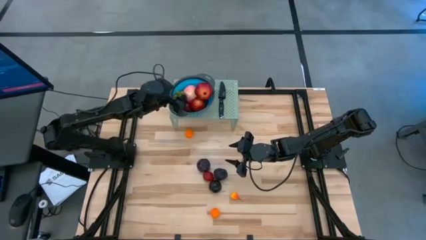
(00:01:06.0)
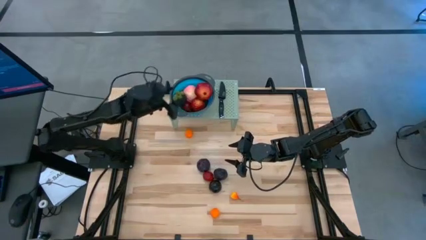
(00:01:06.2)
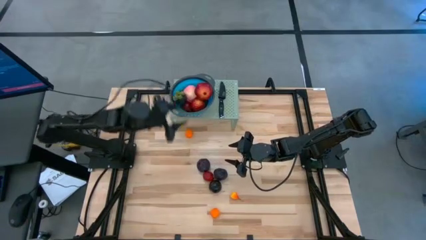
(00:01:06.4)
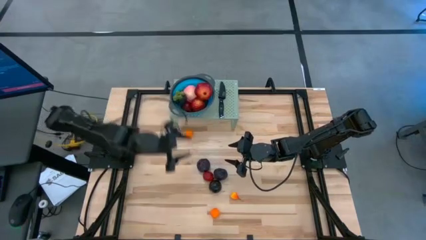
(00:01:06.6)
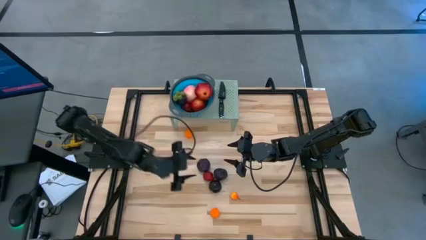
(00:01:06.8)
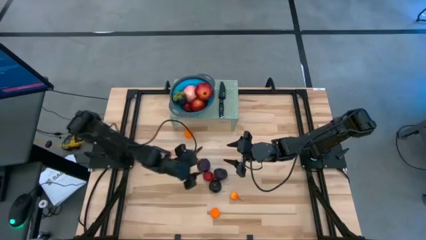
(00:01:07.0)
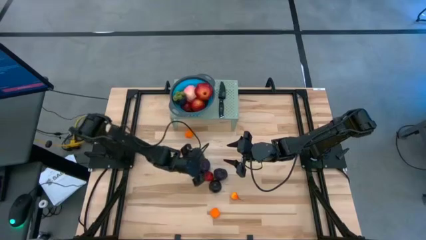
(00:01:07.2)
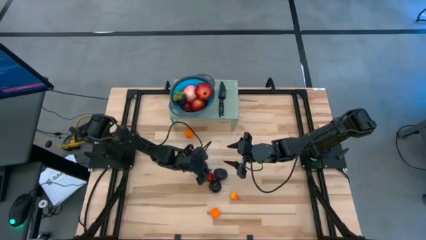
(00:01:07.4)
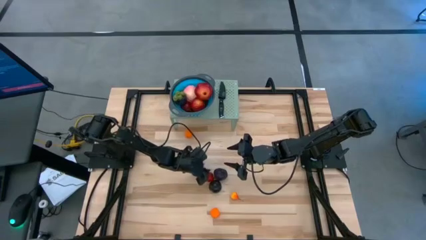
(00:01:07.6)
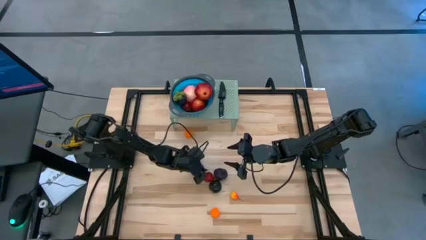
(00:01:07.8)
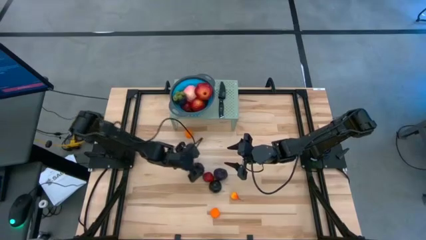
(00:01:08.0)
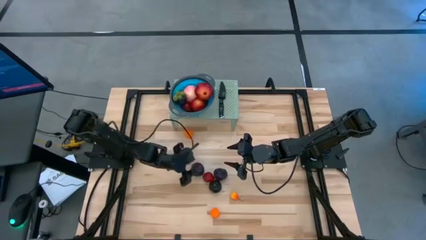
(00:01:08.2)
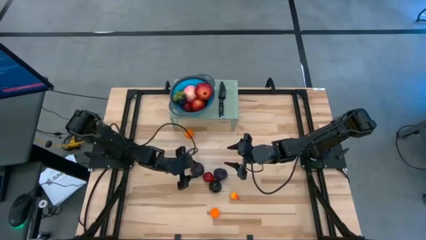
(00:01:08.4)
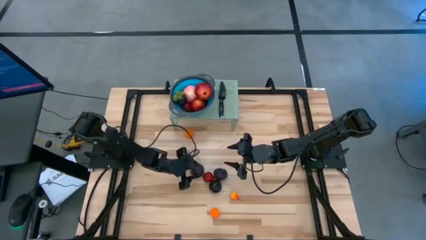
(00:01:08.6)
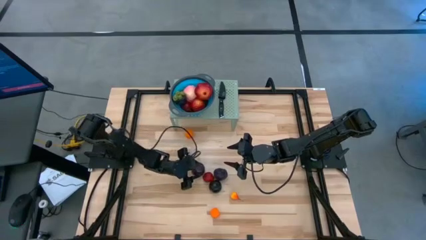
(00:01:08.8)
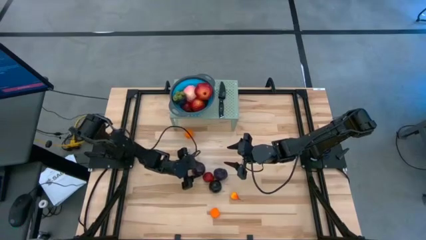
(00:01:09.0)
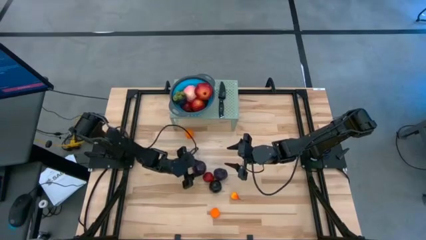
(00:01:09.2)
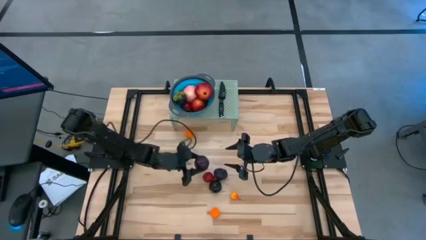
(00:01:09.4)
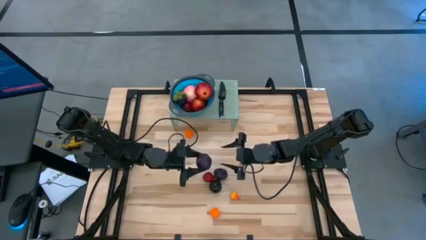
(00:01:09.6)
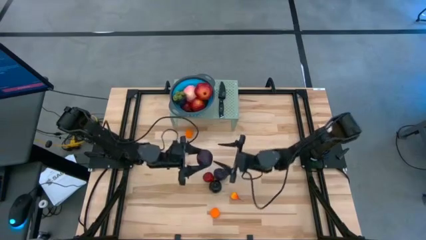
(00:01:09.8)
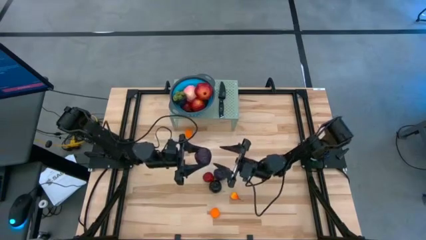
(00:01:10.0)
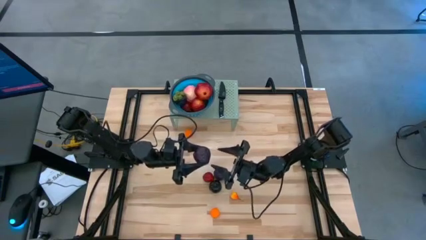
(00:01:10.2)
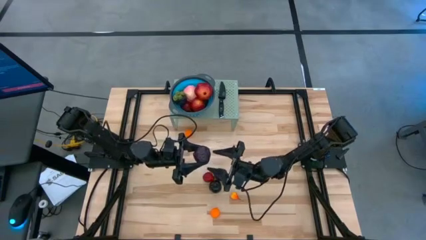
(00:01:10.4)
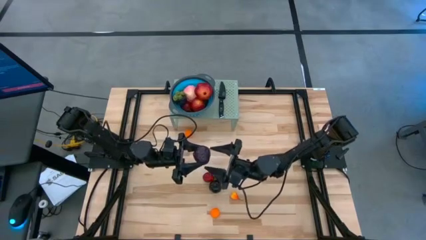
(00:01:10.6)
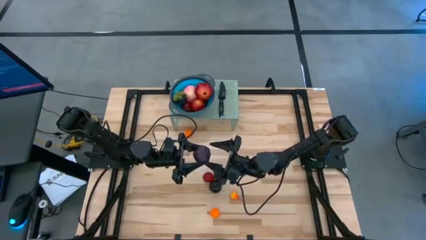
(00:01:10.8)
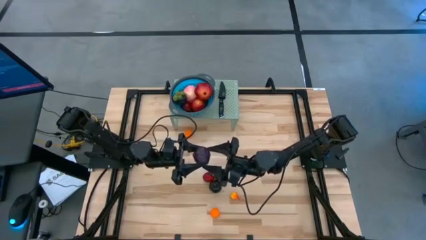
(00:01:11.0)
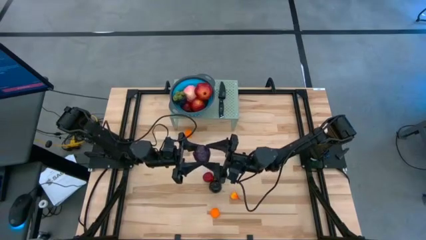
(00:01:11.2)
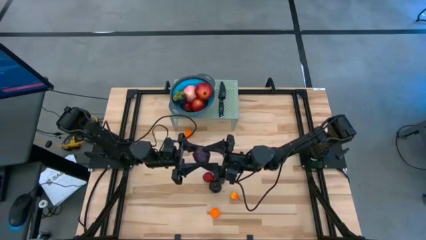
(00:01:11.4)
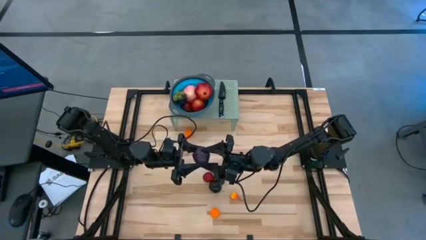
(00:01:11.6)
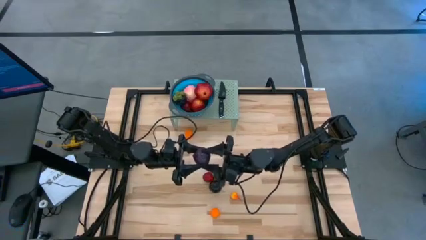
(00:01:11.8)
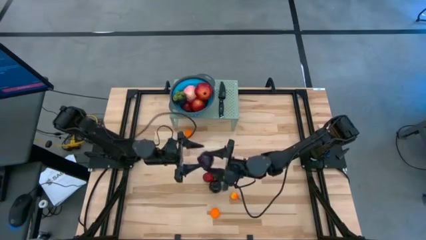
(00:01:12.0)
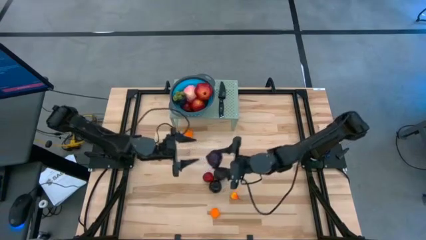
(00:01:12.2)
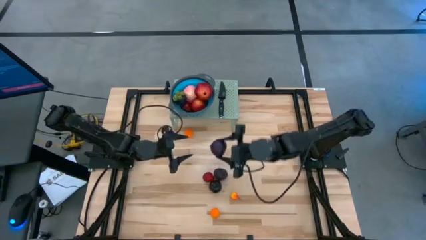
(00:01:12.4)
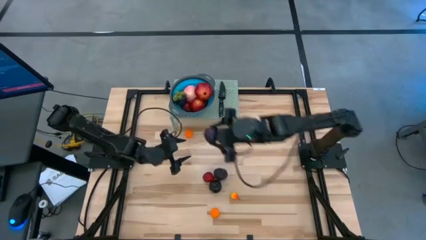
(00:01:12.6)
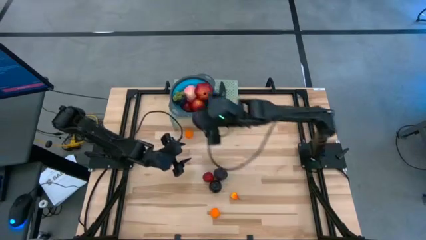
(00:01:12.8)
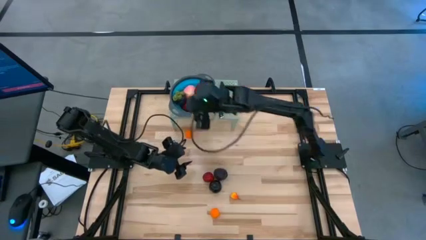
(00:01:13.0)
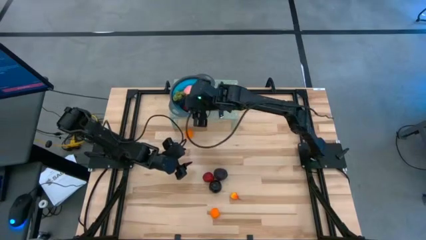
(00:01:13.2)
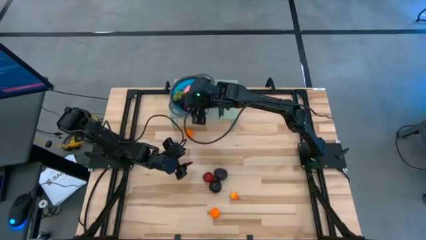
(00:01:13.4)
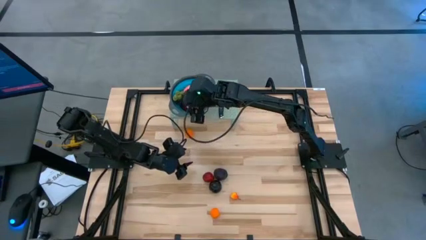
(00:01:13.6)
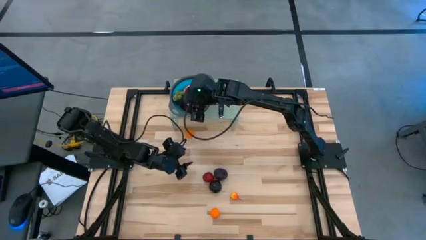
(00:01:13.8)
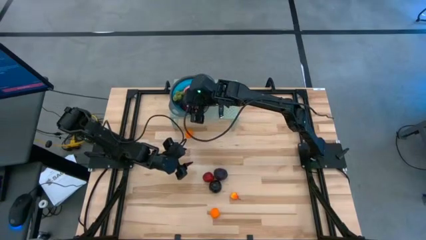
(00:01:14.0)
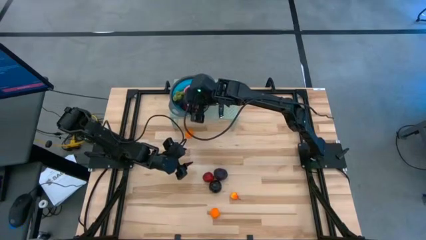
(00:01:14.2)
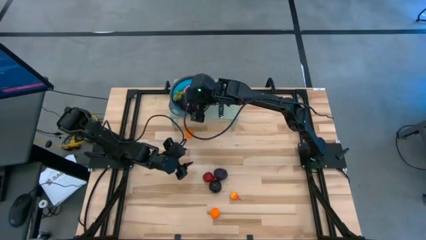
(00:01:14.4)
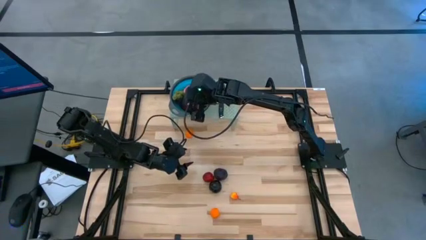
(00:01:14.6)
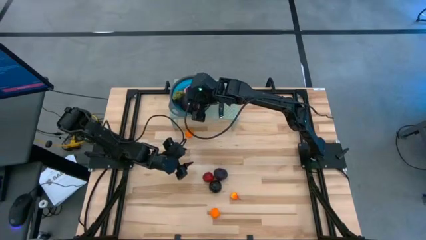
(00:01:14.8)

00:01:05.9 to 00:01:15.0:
Task: Pick & Place Fruit
Put the purple plum into the blue strainer bowl

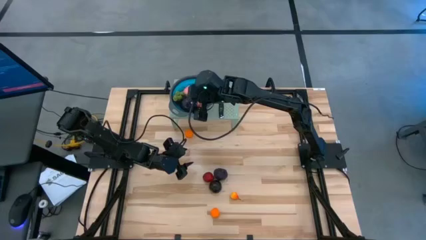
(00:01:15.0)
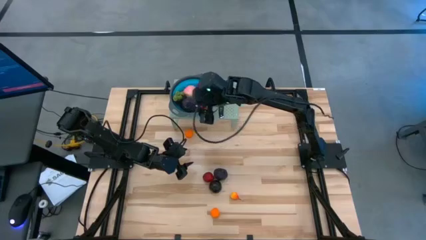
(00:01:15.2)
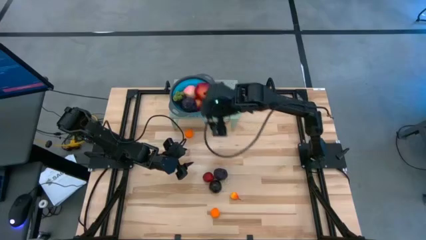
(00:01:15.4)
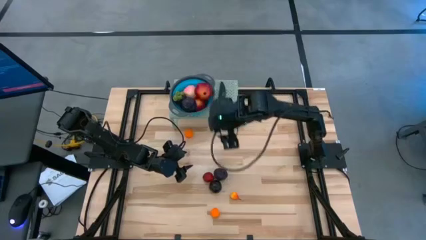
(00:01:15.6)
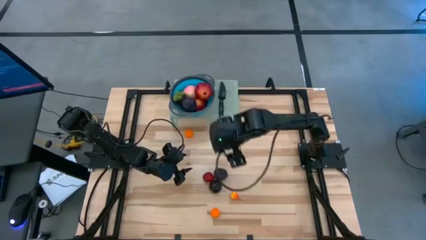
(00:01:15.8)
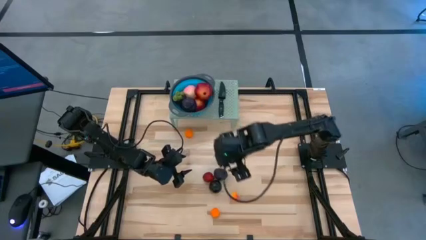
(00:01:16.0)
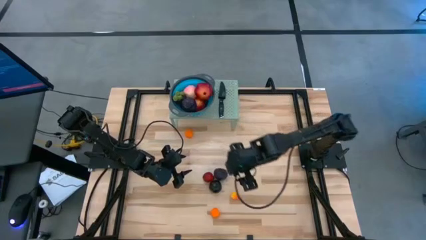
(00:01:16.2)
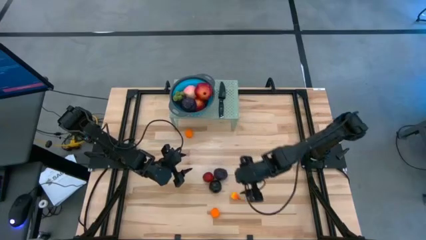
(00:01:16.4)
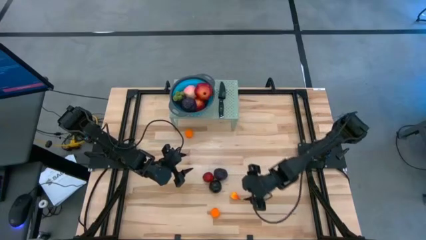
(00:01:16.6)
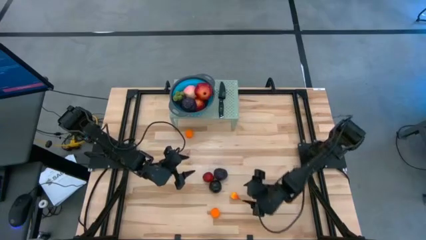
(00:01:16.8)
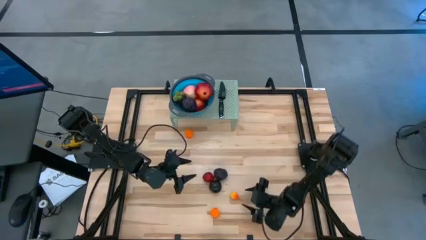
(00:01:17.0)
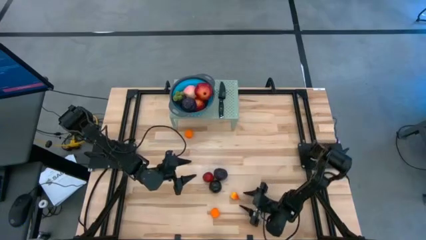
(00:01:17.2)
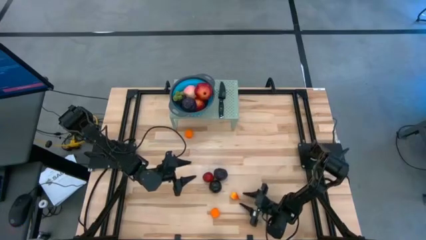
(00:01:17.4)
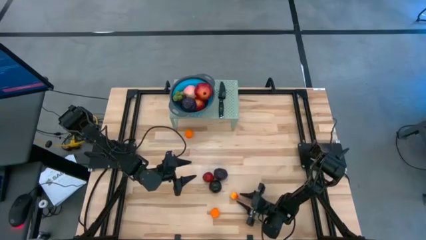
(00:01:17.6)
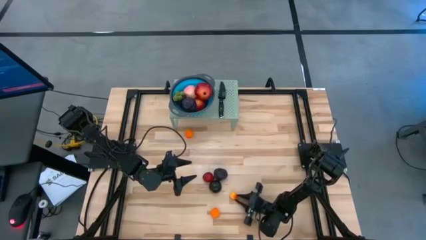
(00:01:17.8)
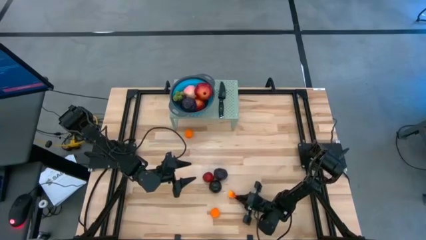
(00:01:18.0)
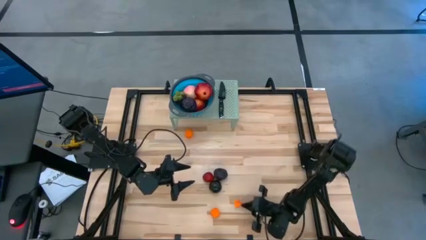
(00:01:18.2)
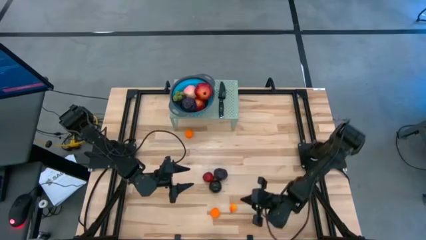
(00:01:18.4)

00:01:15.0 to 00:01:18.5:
Put the orange pear into the blue strainer bowl

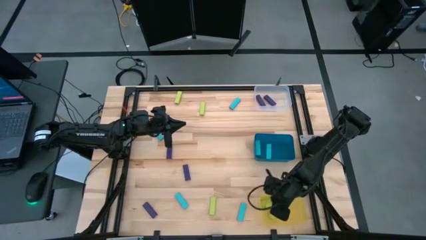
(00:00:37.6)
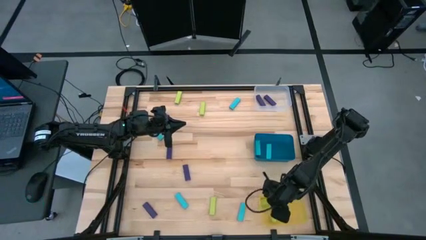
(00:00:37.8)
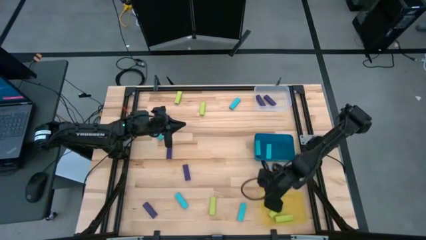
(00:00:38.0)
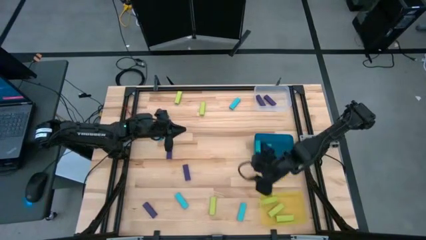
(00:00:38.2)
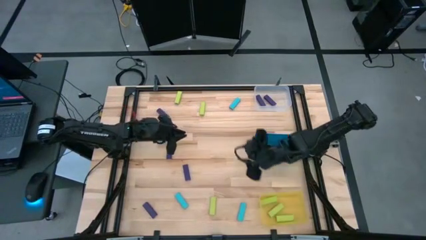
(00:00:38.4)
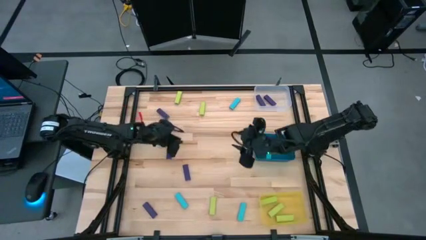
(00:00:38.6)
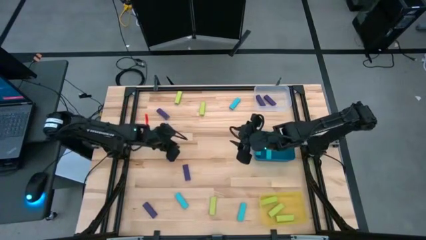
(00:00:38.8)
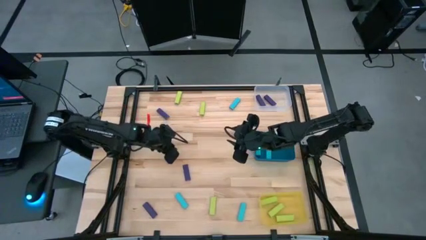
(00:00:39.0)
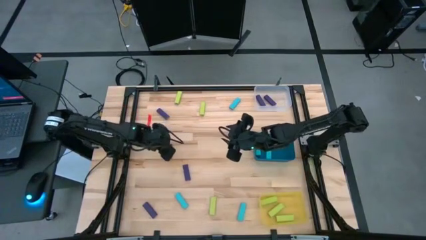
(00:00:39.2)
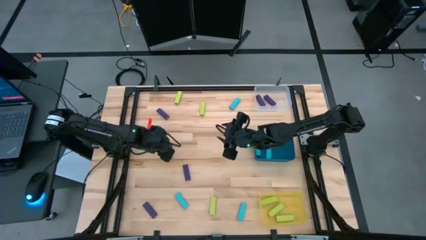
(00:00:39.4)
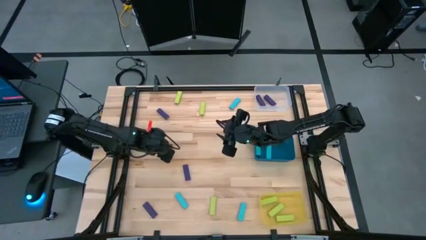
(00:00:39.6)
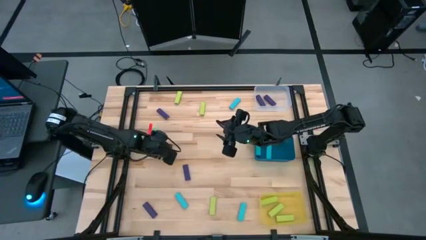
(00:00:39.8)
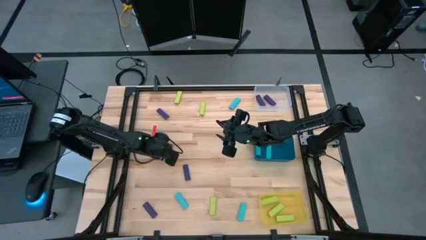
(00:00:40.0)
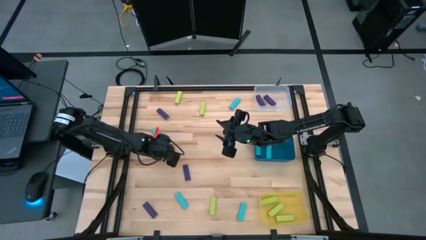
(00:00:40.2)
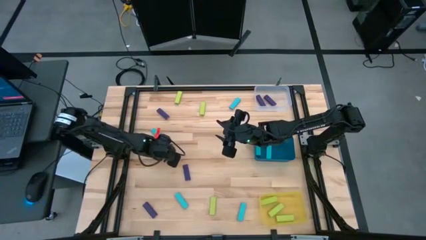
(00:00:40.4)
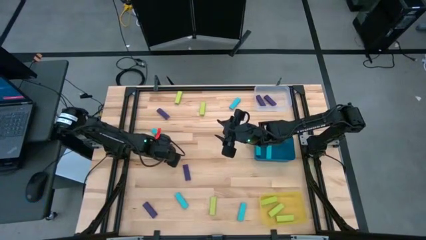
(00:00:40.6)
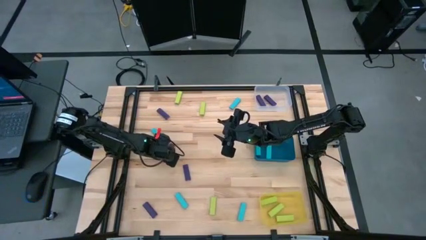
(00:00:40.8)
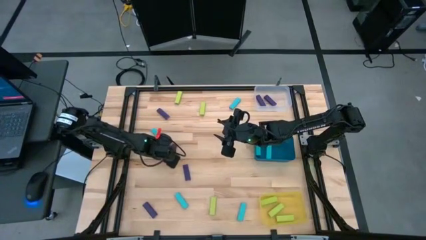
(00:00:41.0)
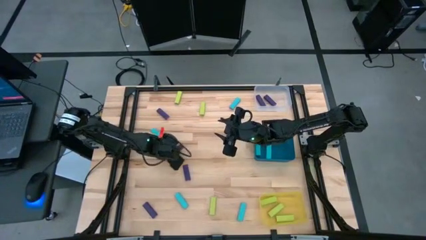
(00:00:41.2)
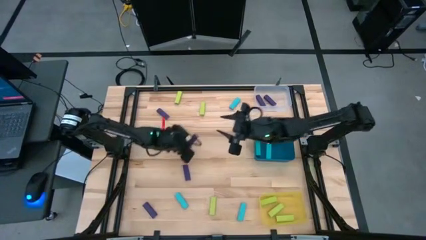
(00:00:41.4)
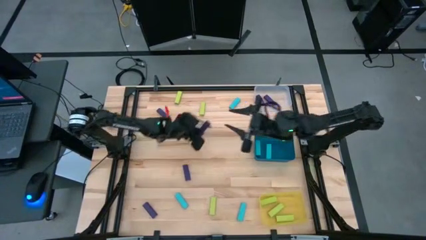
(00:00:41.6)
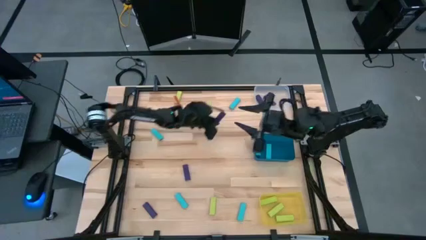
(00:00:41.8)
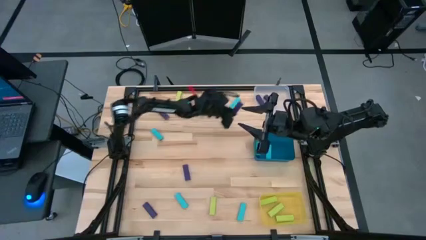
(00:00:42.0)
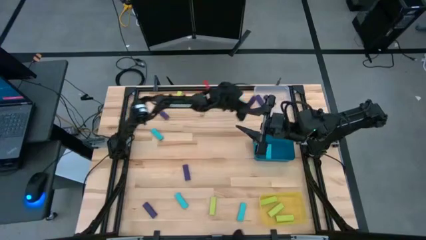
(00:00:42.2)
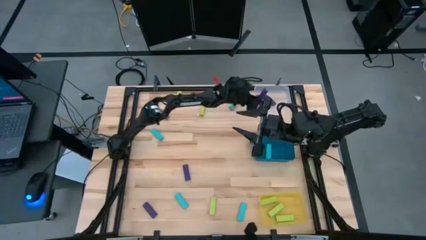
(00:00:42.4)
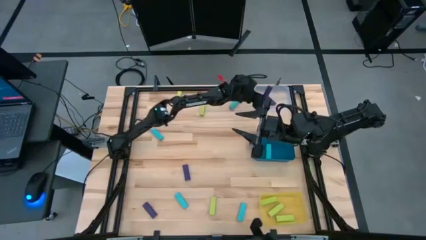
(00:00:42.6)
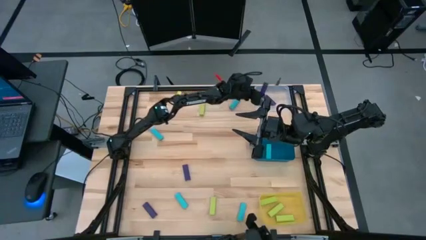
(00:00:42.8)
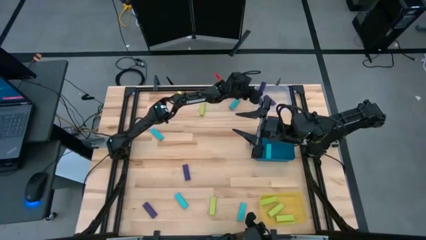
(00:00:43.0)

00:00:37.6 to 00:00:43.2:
Task: Sort blocks
Put the purple block into the transparent bin
